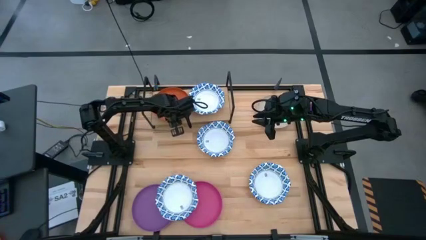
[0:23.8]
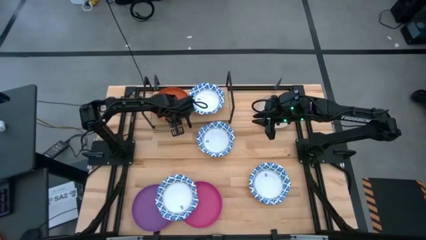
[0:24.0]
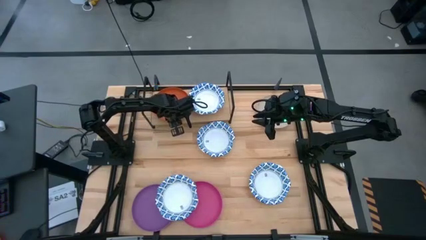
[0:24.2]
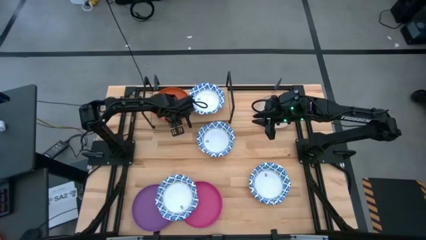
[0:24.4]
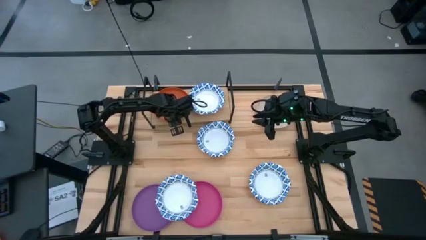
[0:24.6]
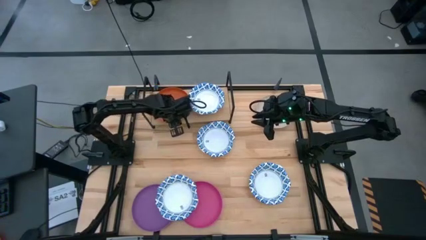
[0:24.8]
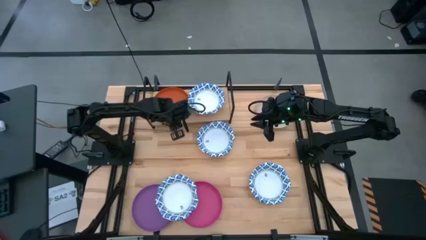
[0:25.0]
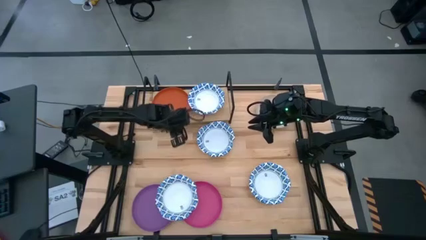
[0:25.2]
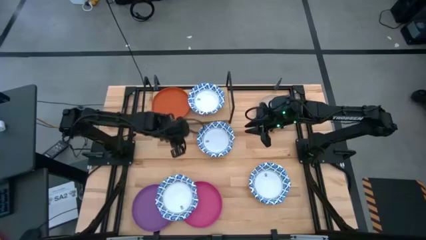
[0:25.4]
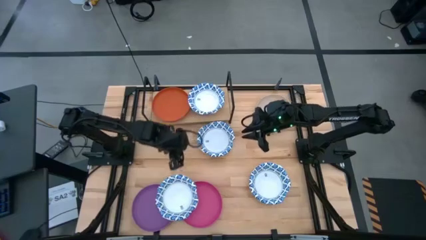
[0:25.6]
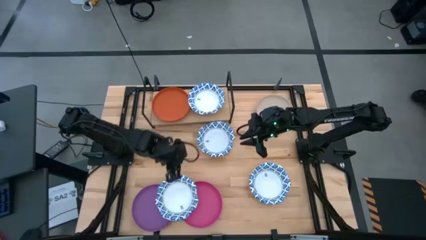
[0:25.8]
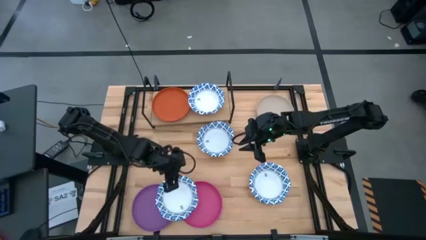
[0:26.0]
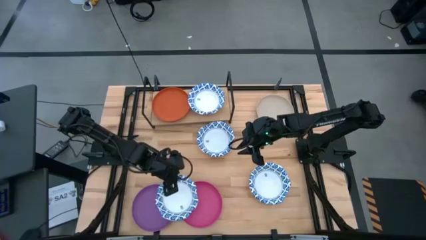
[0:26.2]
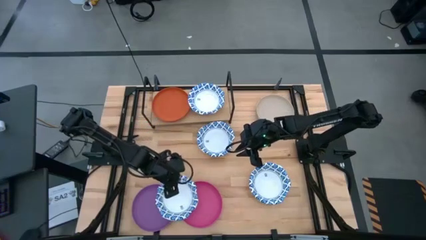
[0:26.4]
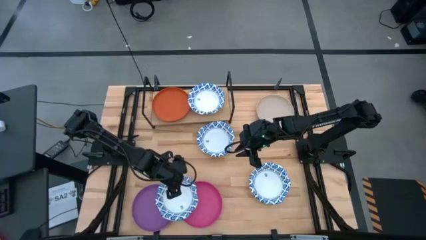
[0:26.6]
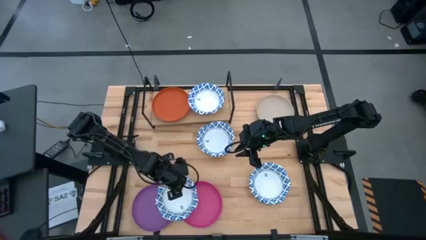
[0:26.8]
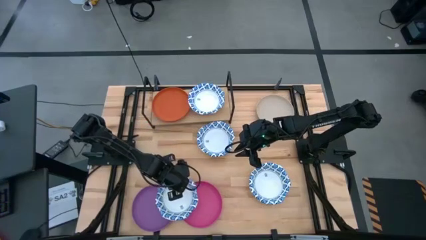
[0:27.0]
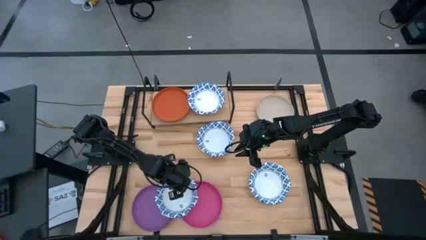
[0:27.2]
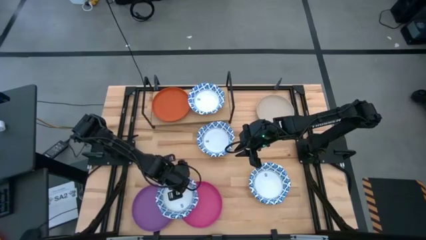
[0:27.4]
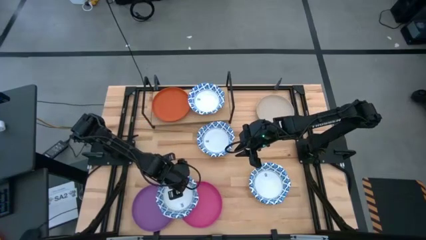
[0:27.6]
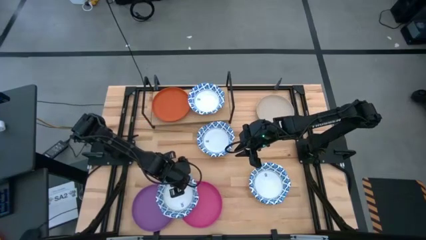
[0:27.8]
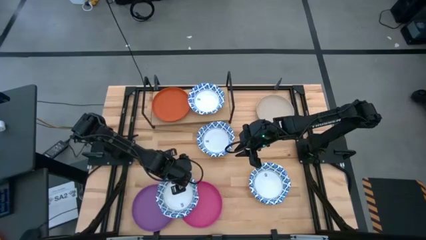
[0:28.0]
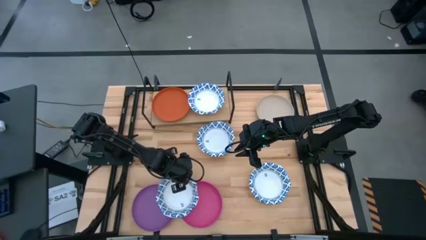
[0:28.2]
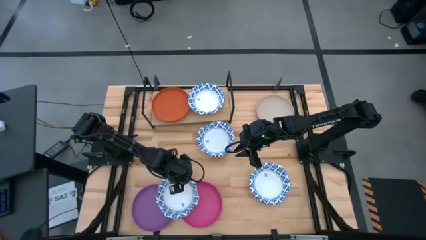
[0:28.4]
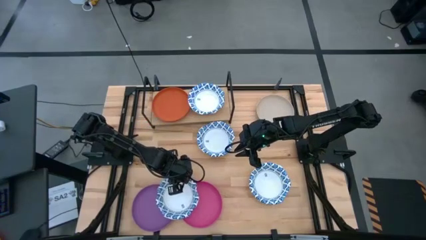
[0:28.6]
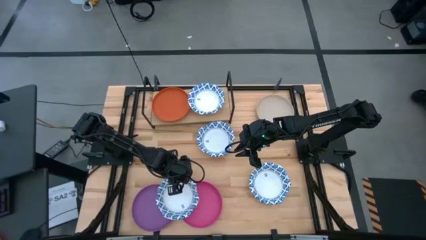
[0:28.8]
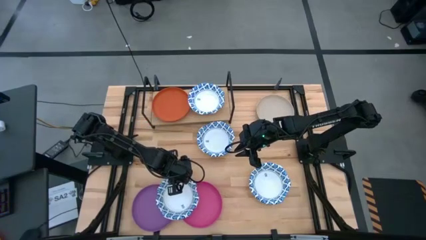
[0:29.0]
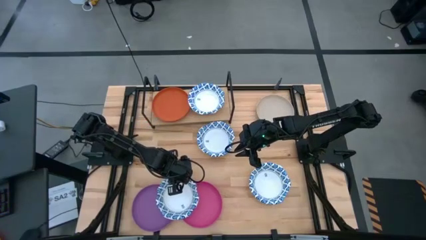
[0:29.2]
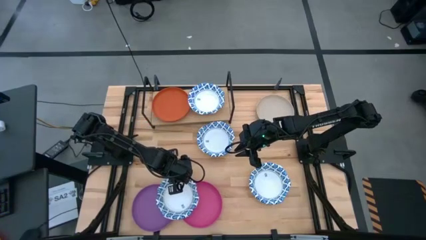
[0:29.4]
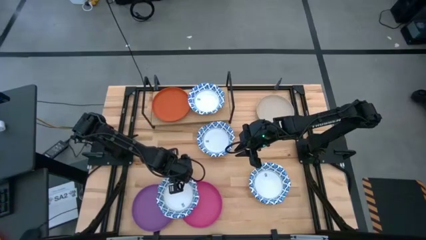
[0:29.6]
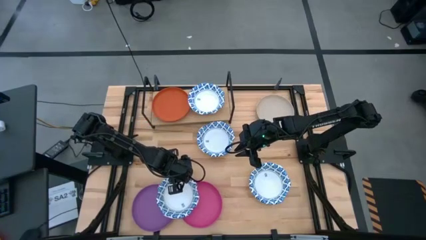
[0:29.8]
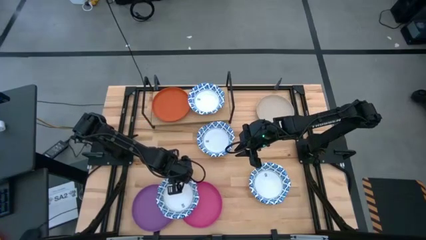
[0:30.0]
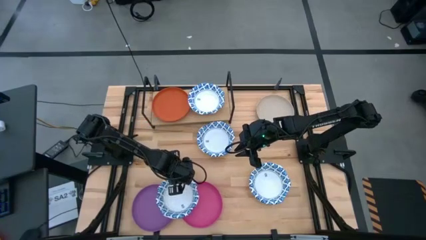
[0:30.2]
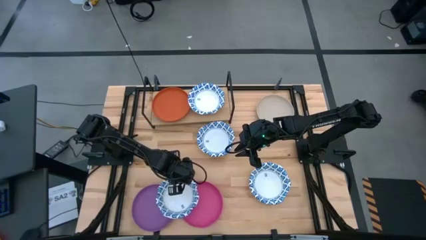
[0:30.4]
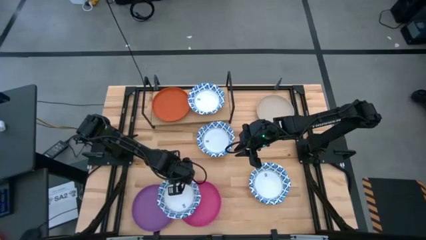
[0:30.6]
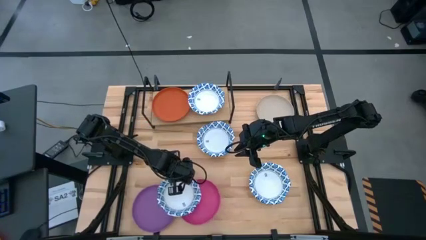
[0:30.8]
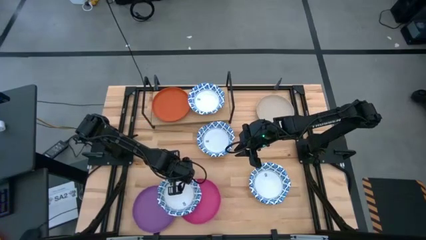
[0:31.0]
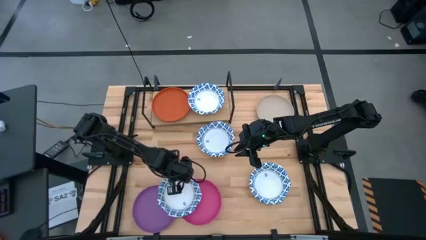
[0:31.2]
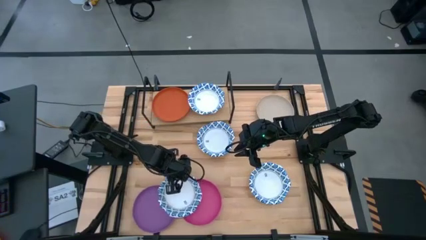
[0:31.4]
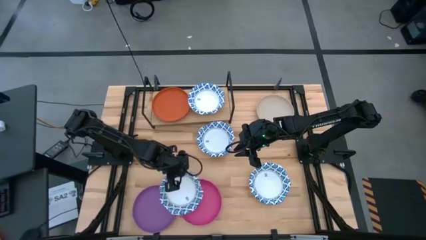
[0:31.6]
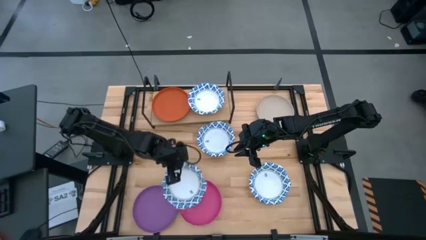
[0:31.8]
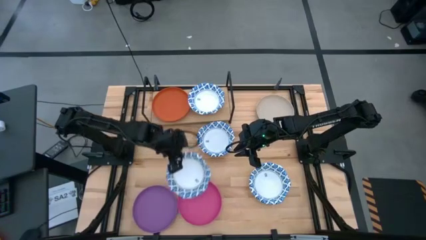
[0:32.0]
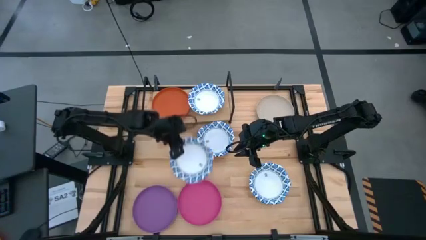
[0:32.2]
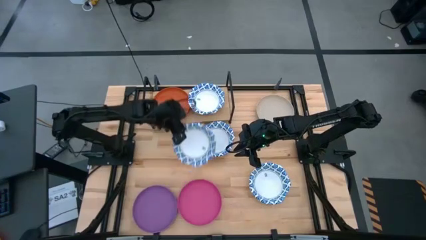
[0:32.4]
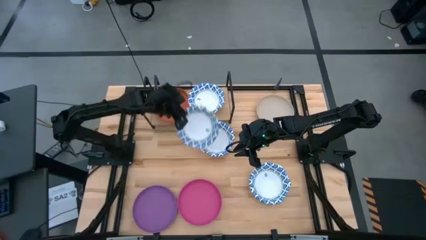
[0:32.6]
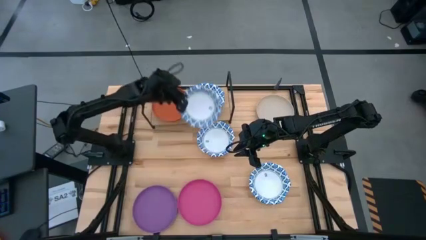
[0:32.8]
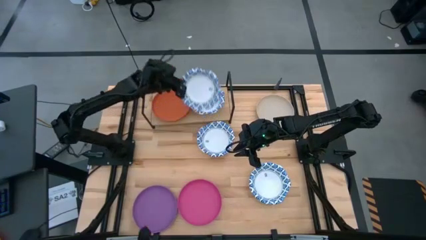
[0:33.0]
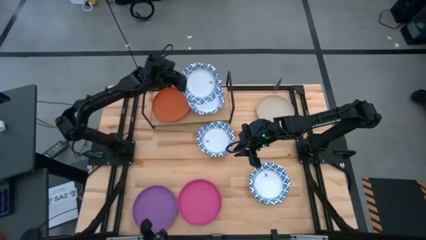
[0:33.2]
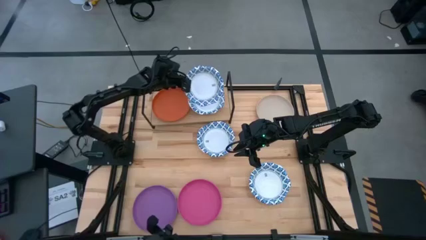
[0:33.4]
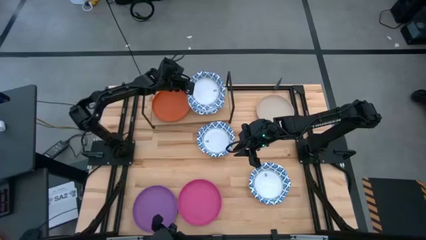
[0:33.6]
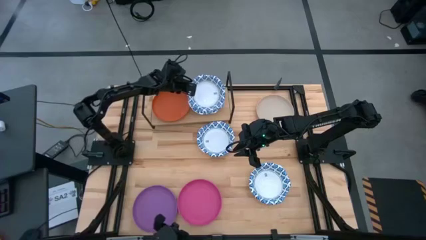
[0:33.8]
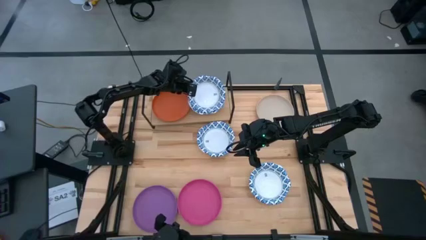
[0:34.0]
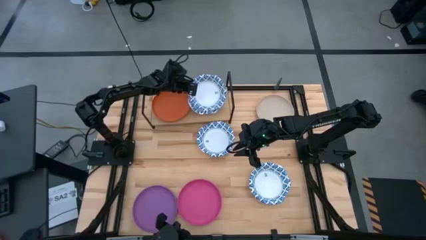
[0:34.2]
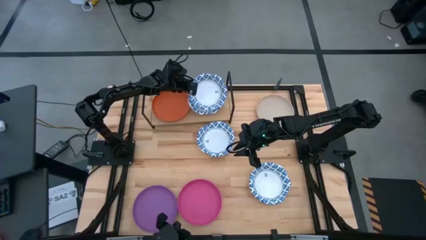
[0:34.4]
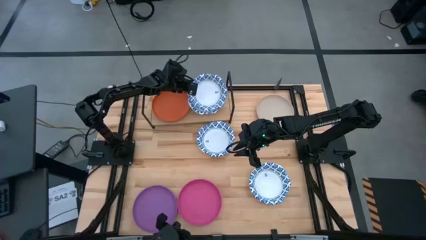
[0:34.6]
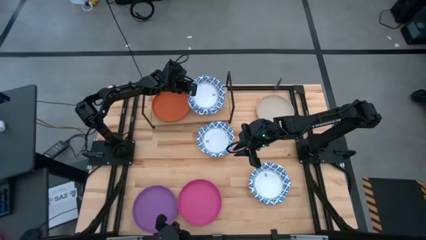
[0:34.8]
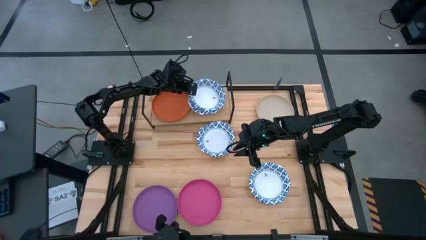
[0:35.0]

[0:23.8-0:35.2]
Task: Place and stack plates onto a shelf
Stack the white bowl on top of the white bowl on the shelf
